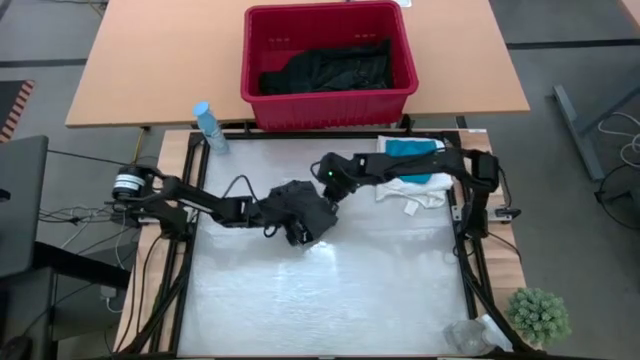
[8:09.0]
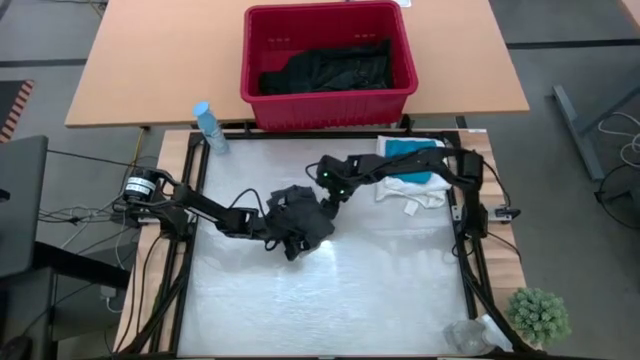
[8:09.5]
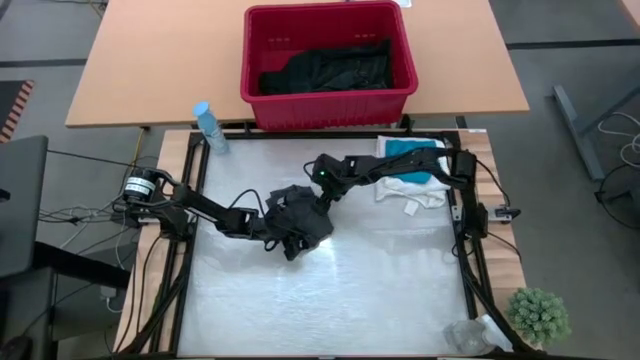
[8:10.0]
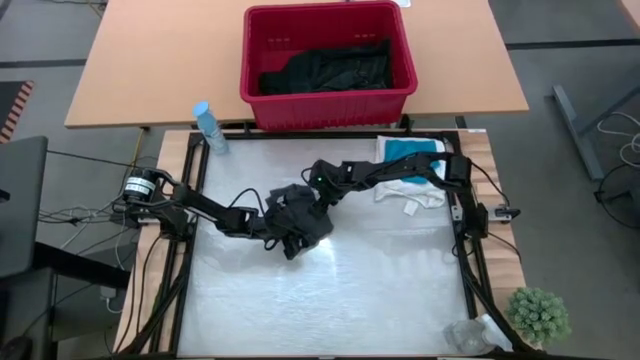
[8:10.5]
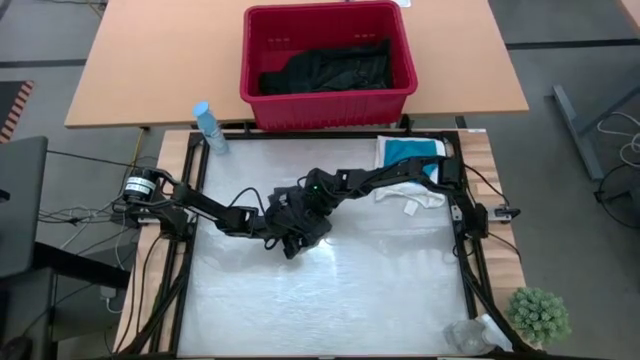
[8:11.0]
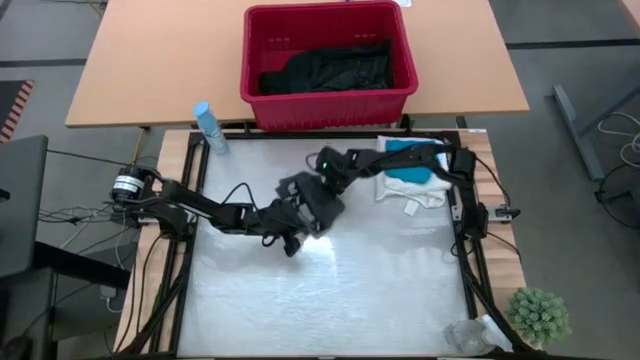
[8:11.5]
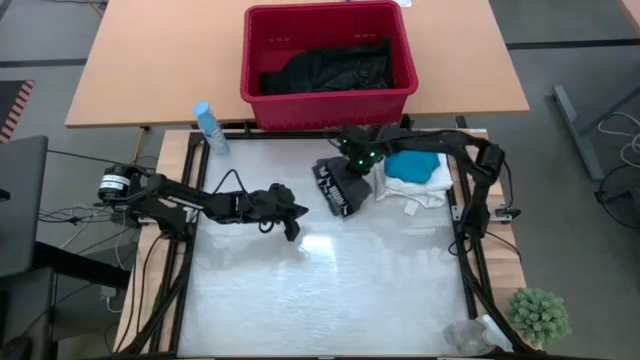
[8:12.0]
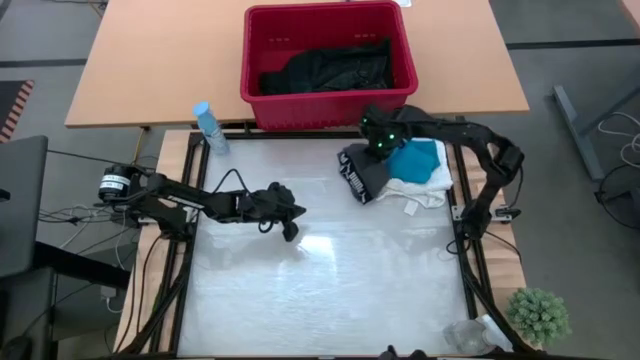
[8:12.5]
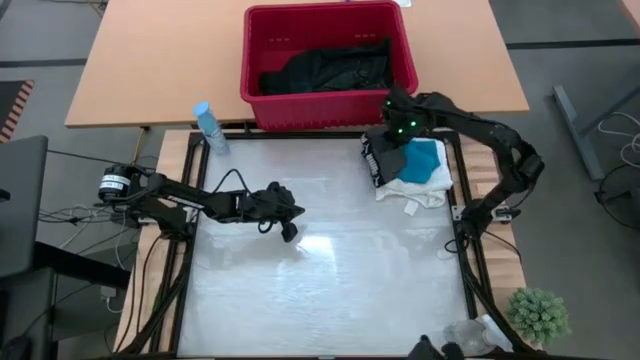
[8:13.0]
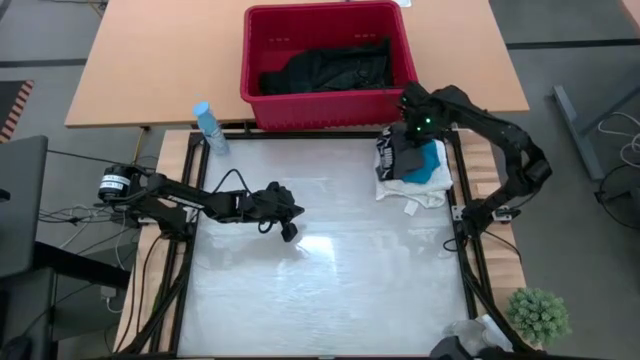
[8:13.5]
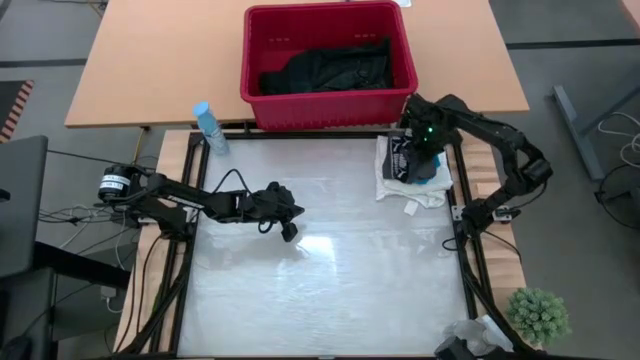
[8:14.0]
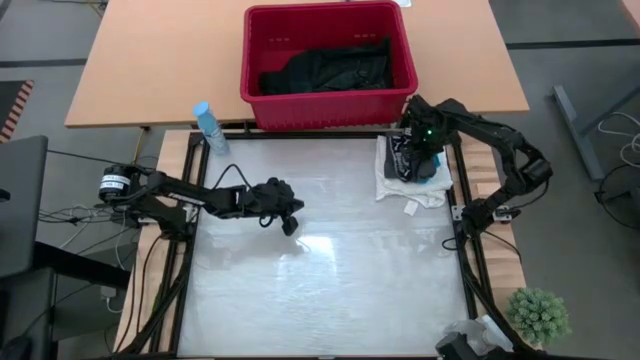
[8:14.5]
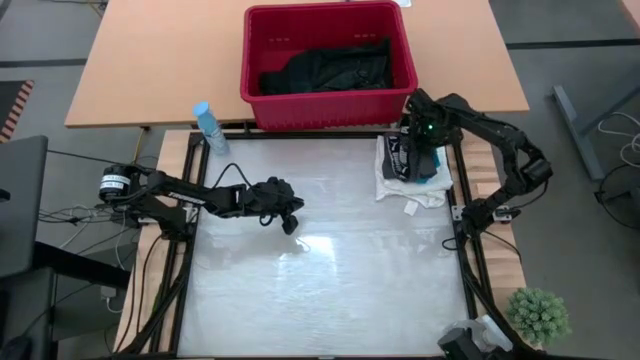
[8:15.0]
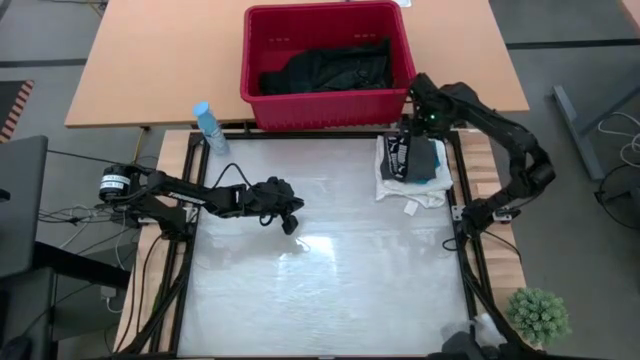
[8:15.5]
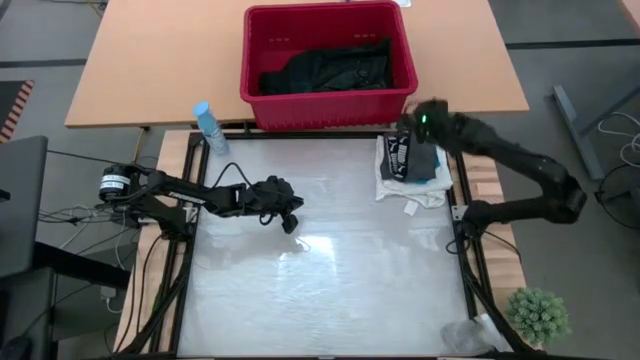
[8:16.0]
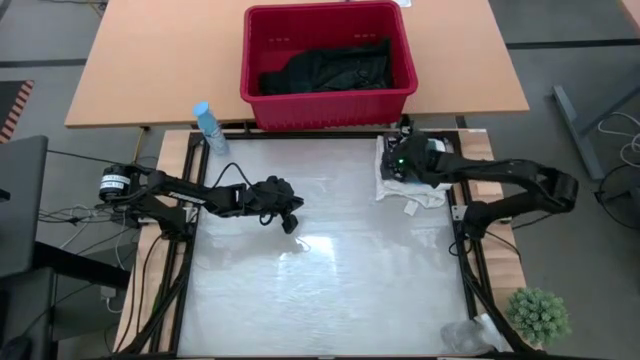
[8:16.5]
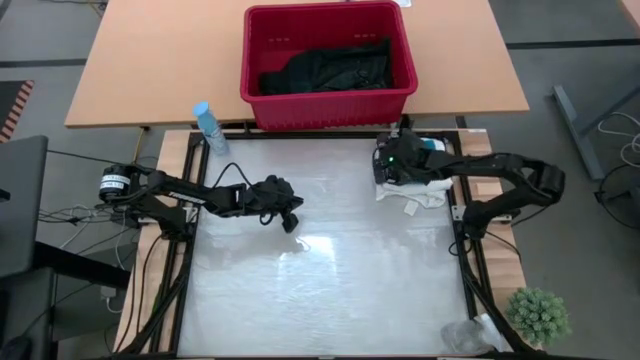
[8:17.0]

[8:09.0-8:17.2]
Task: Fold laundry
Stack the gray boxers on the blue shorts

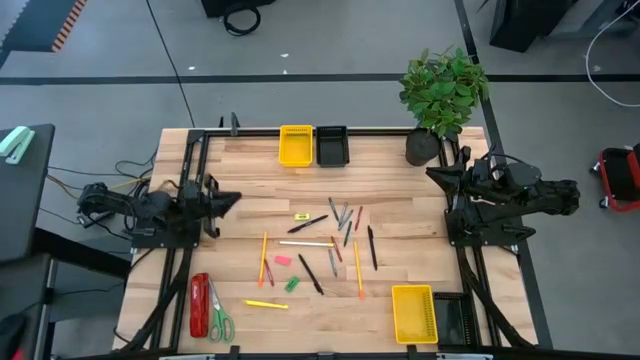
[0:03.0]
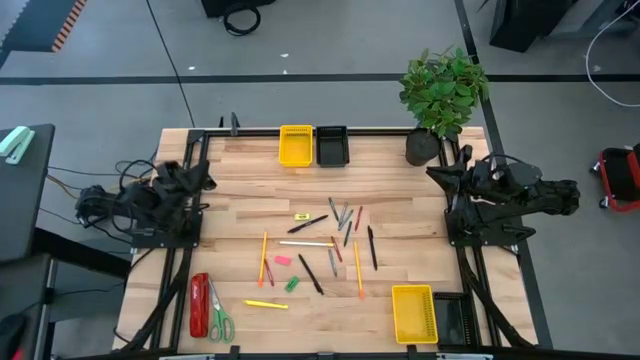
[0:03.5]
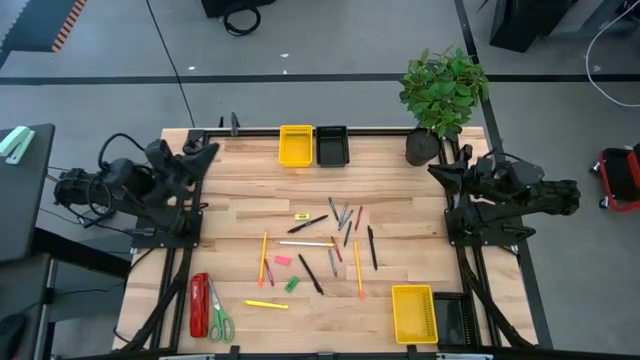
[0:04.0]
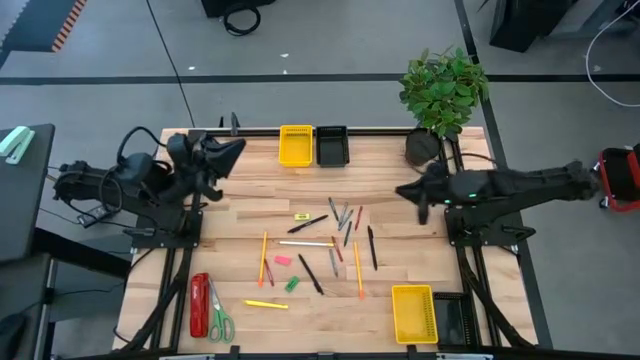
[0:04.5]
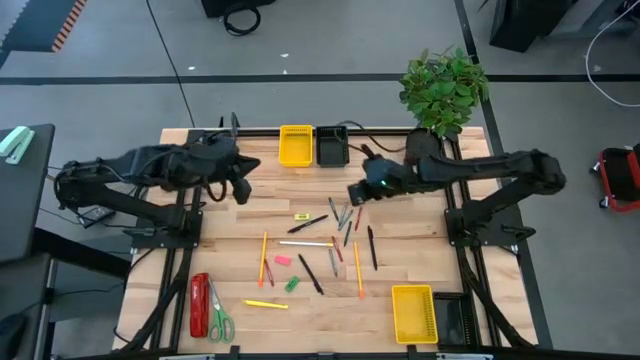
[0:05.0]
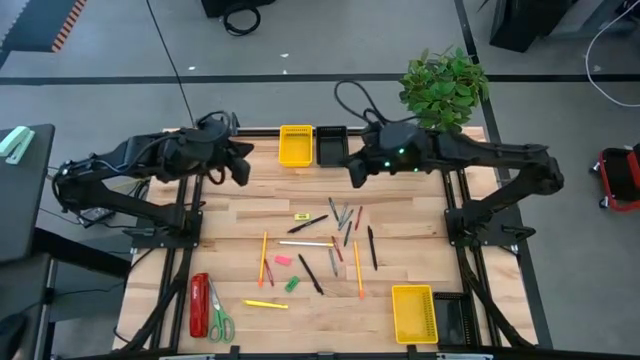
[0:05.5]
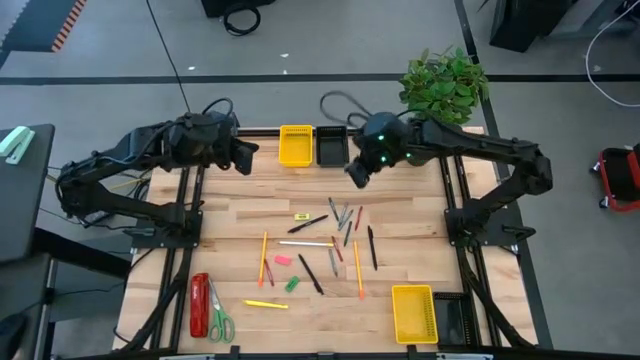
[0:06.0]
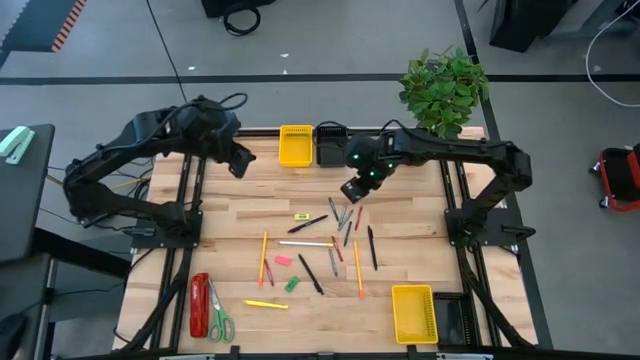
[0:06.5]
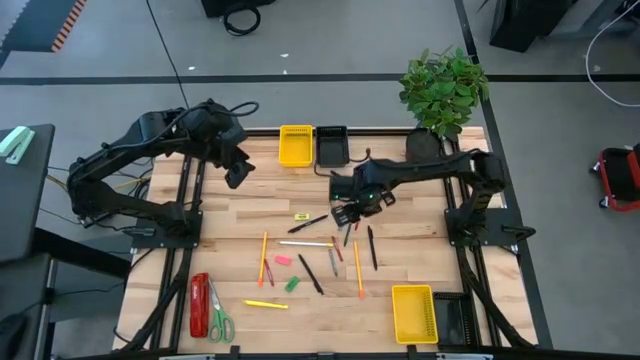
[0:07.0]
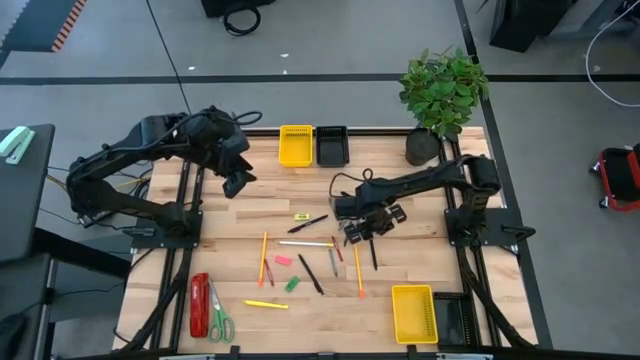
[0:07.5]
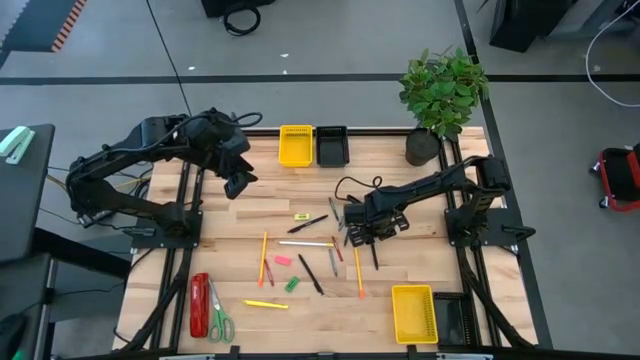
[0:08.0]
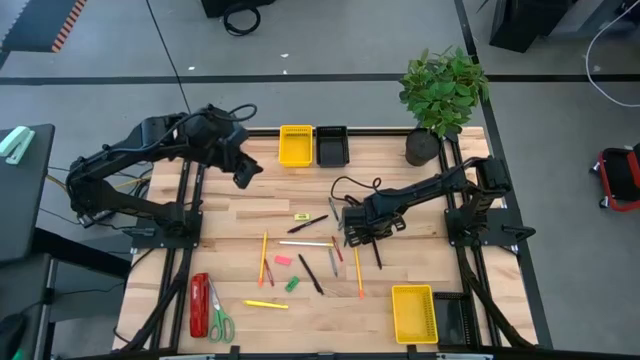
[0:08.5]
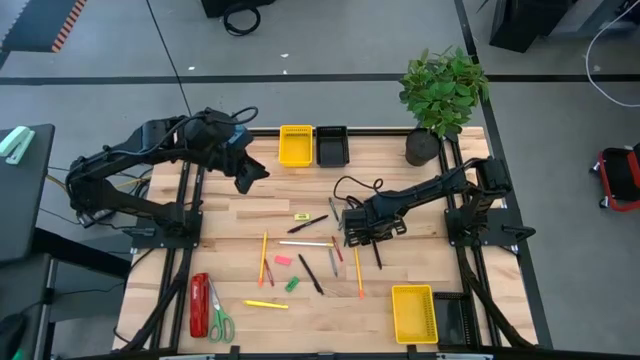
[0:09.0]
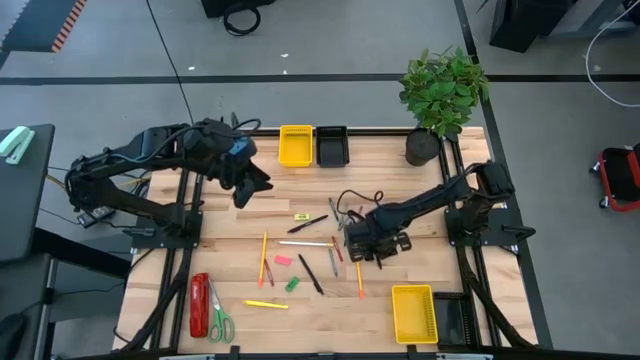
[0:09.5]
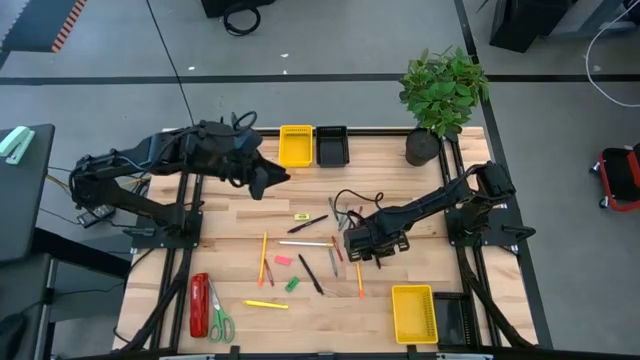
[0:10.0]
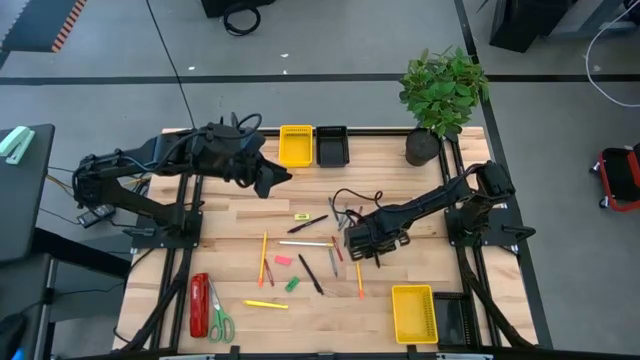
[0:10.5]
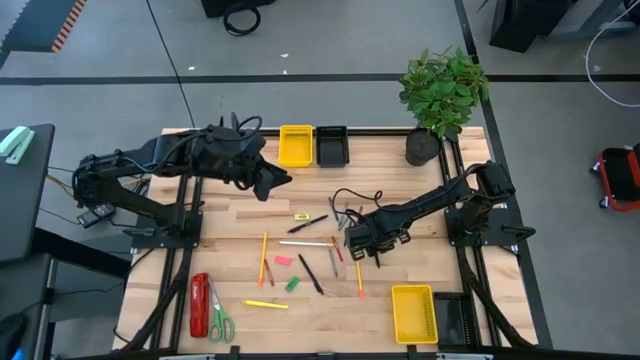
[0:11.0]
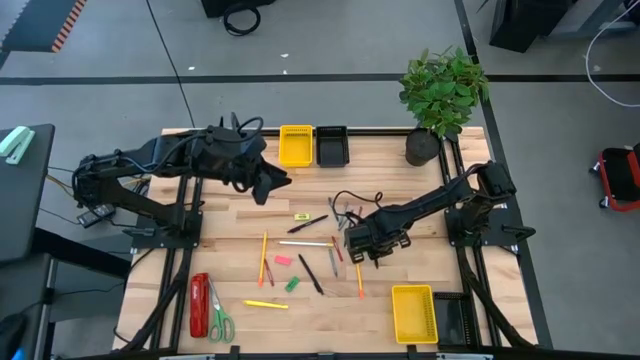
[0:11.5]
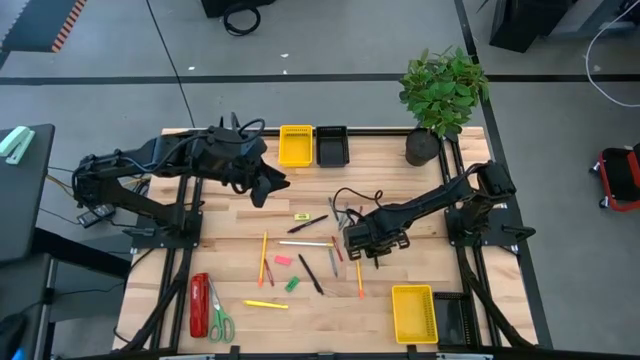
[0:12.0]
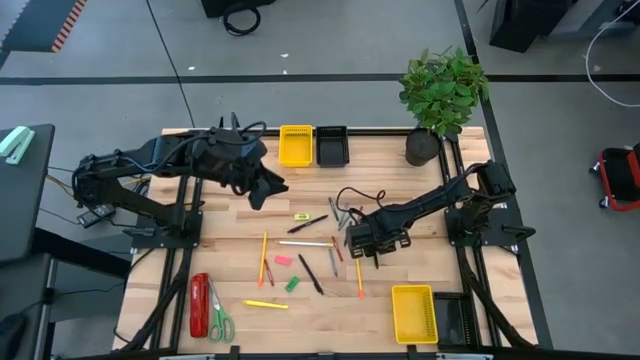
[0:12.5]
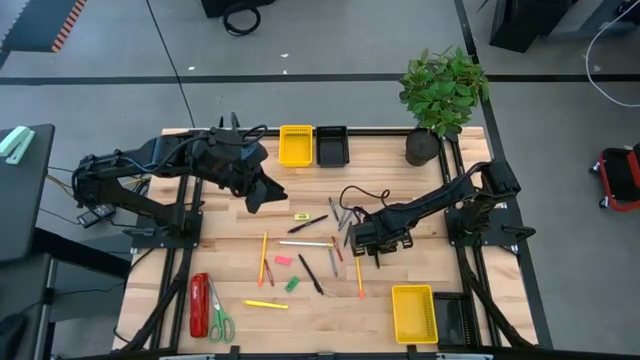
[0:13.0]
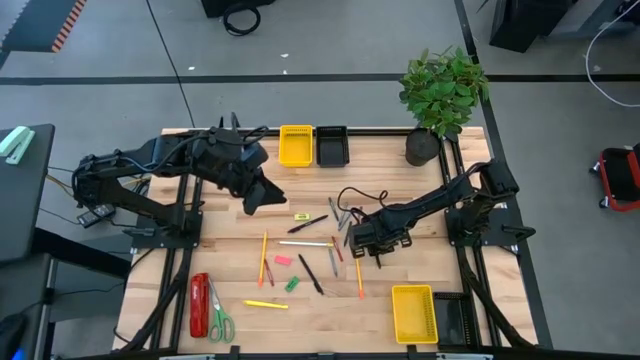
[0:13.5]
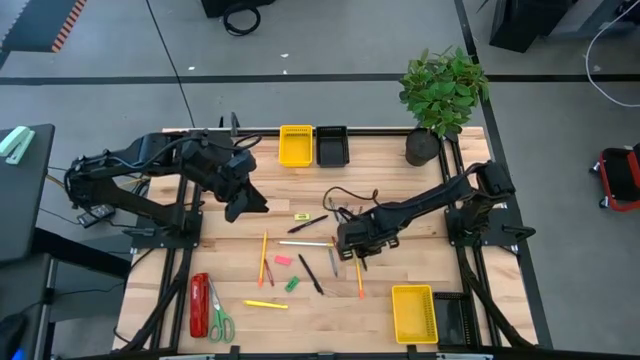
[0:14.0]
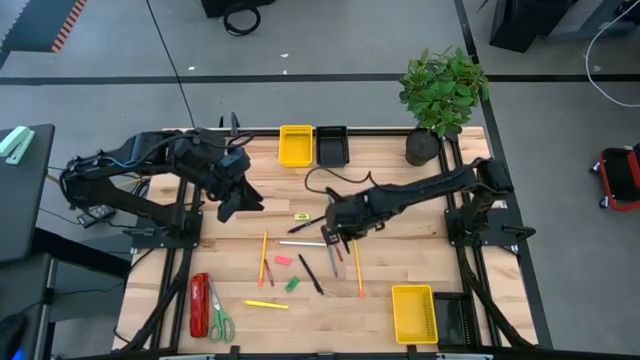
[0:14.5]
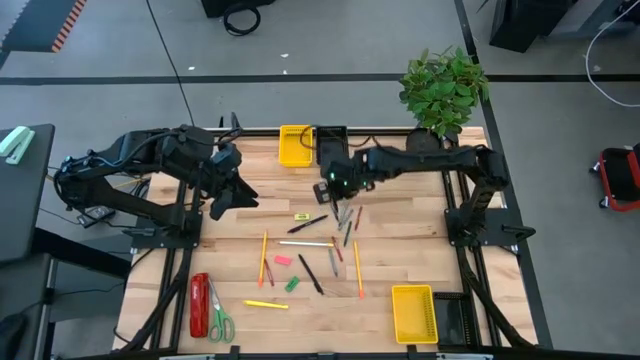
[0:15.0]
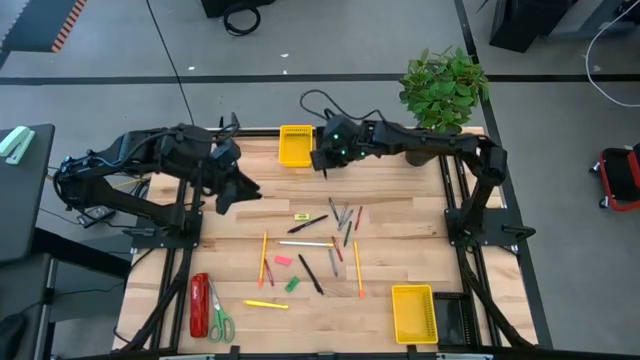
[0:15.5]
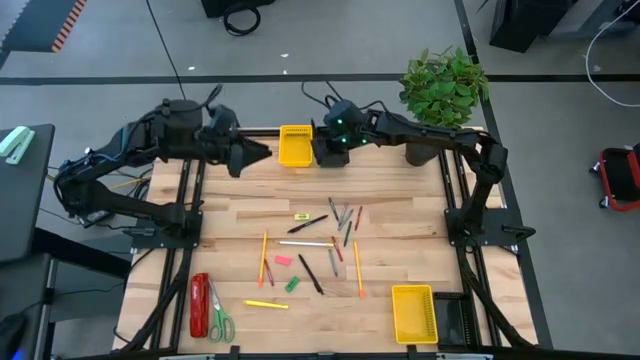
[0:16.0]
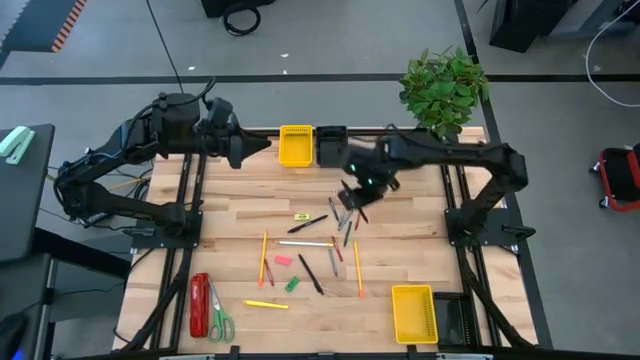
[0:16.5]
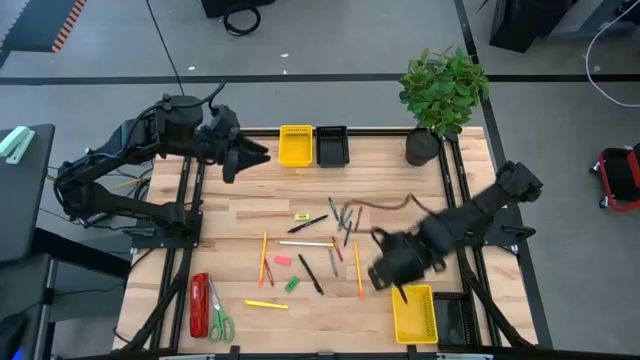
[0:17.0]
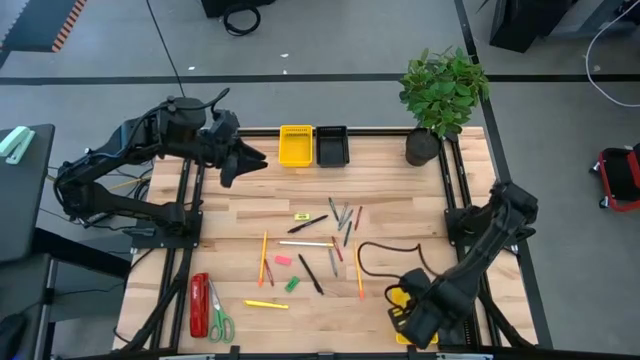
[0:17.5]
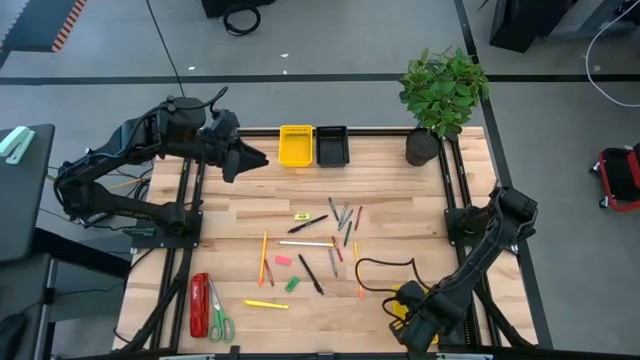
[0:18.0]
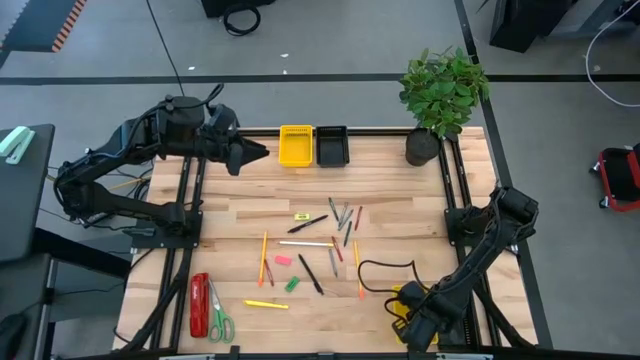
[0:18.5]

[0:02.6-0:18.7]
Task: Sort crayons/erasers/pens/pencils in bins
Put the middle right black pen into the bottom yellow bin
